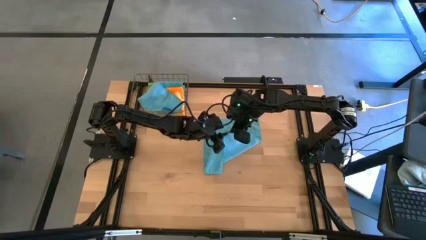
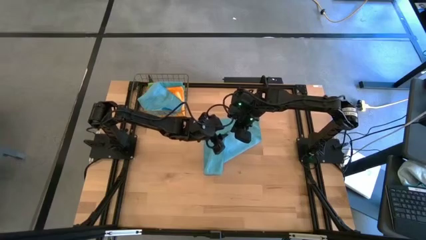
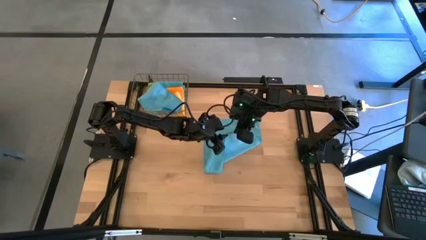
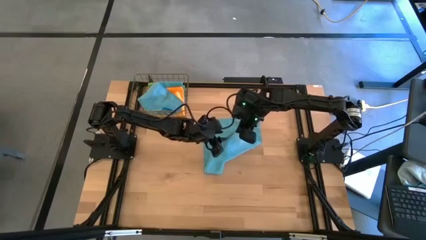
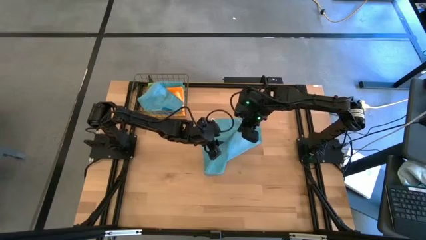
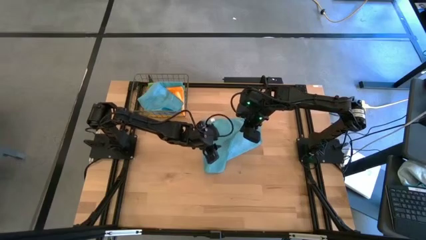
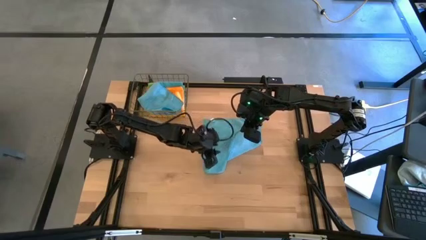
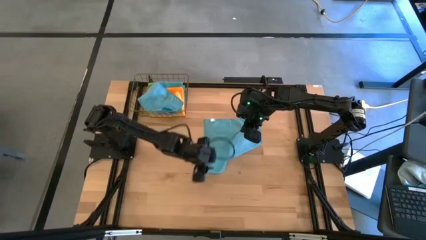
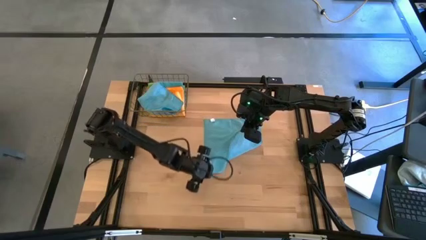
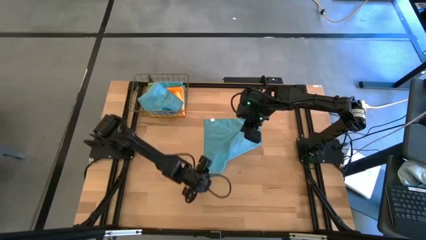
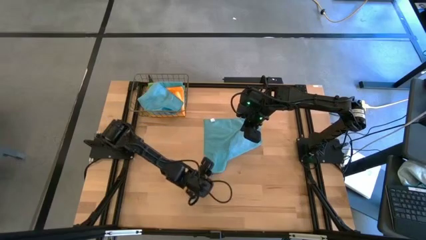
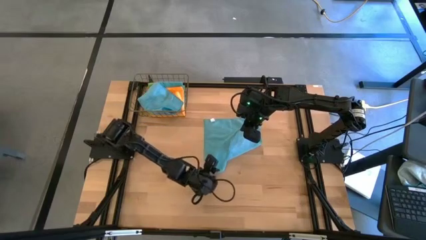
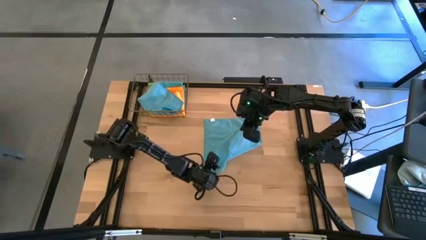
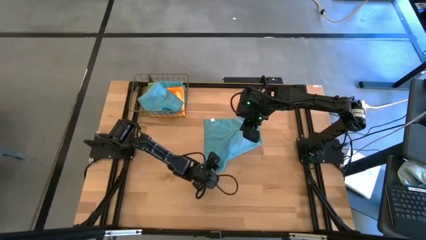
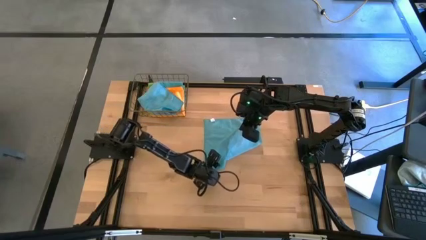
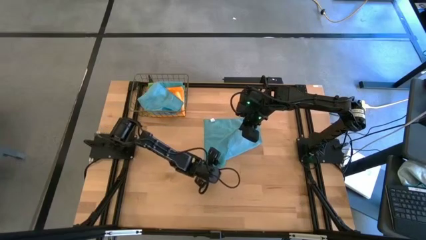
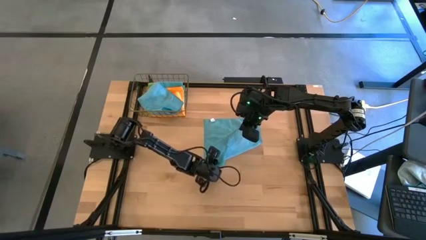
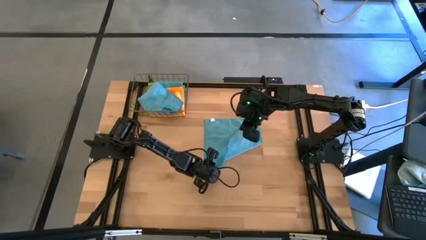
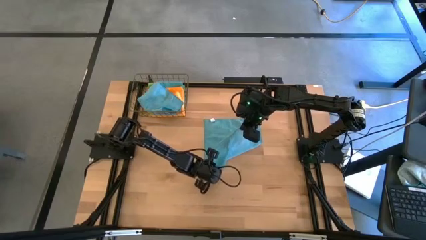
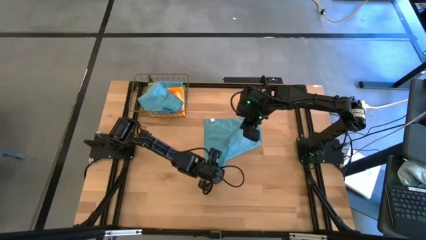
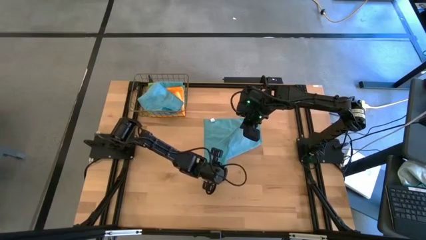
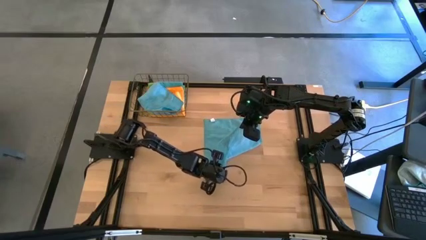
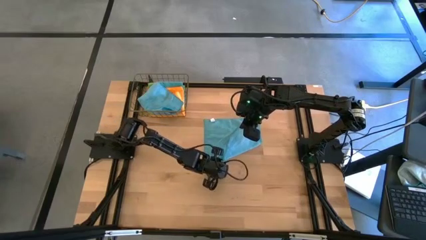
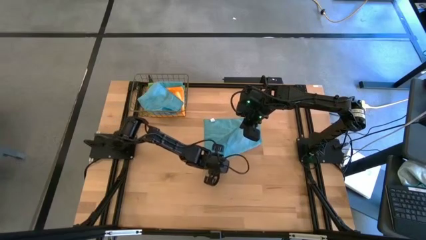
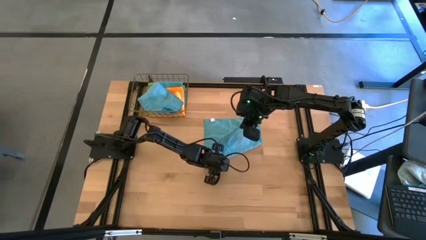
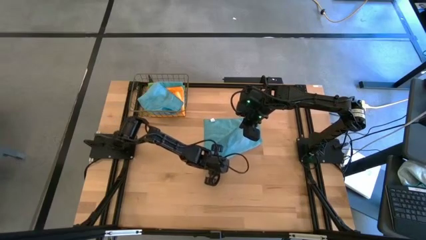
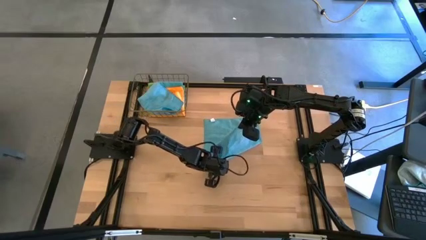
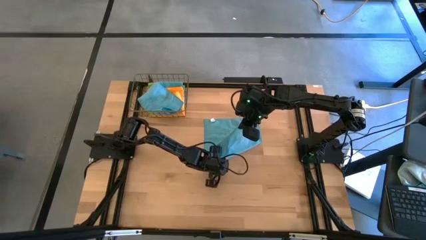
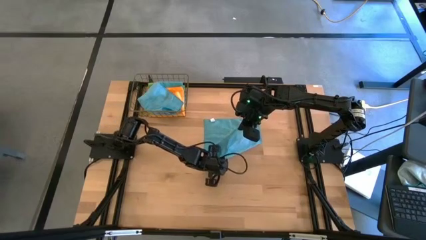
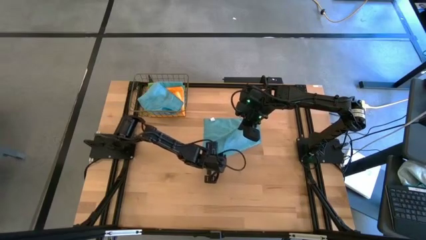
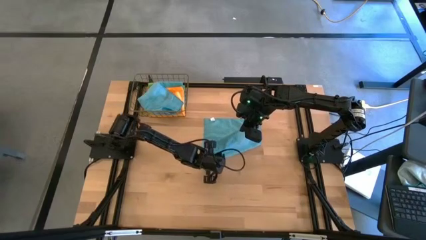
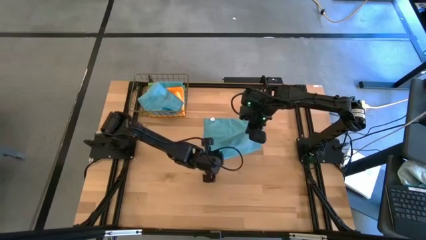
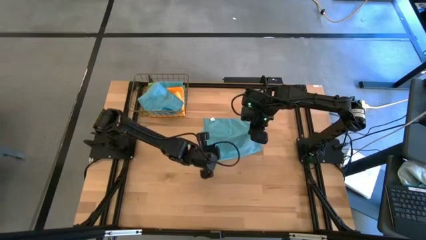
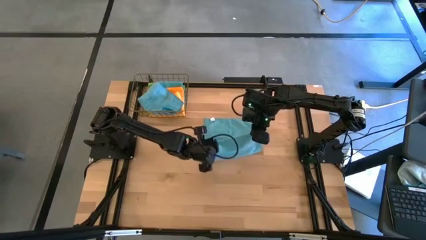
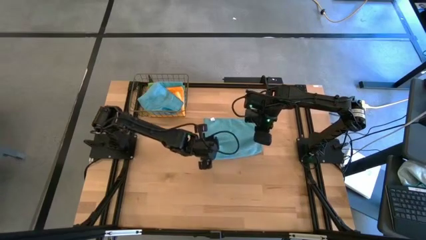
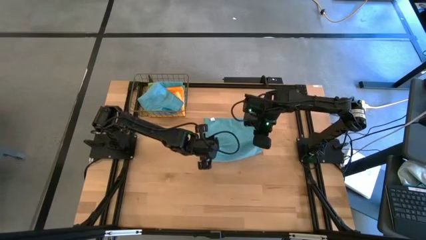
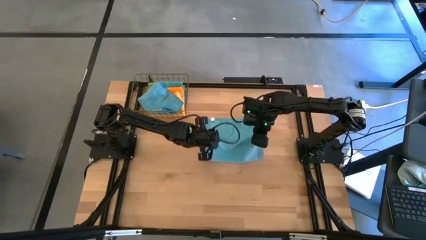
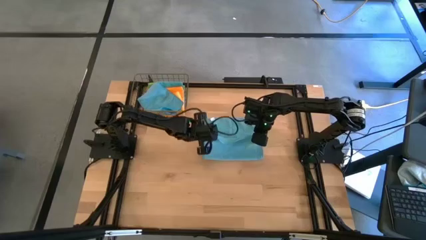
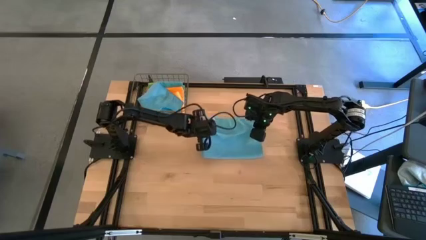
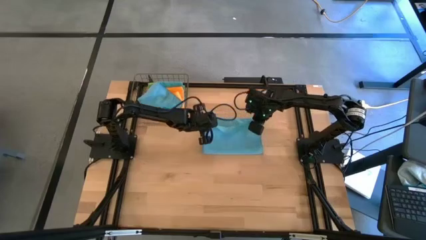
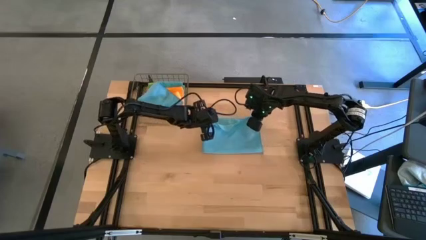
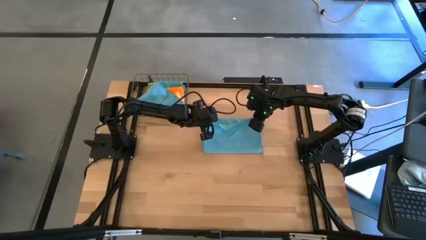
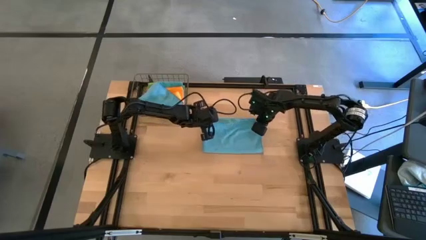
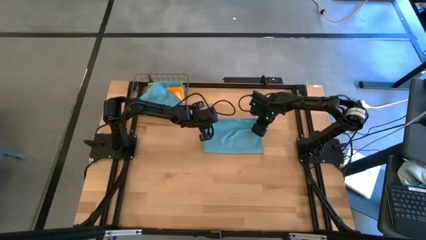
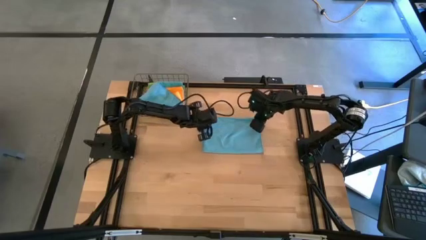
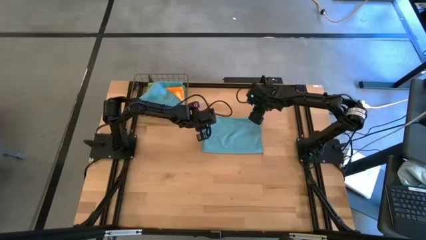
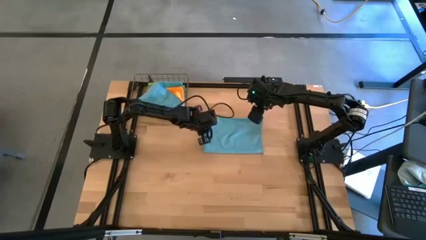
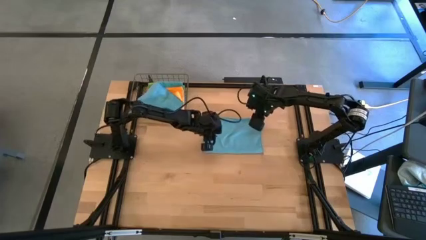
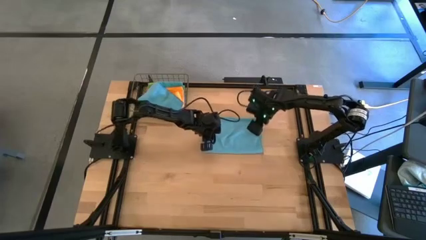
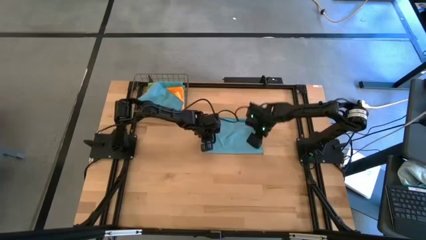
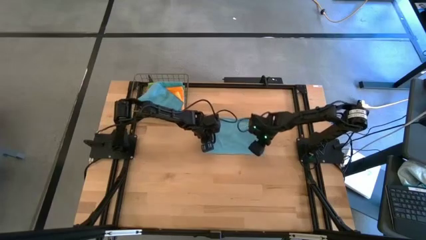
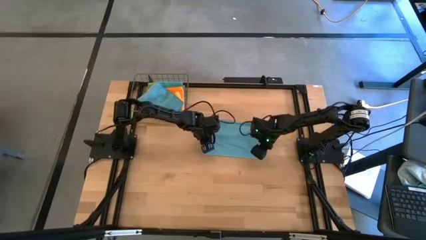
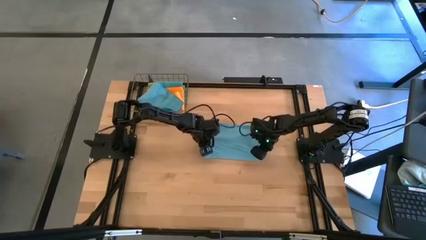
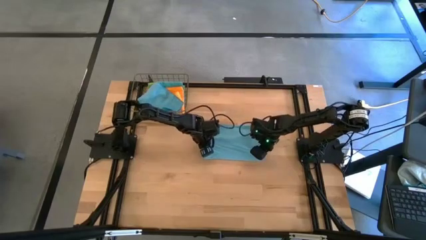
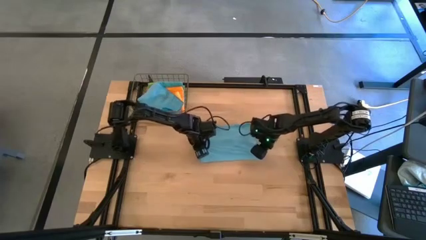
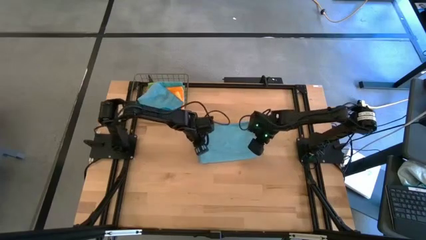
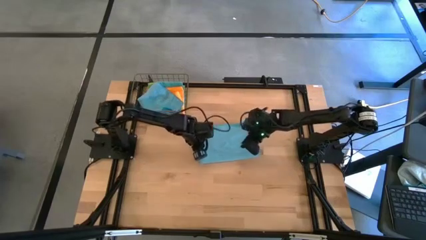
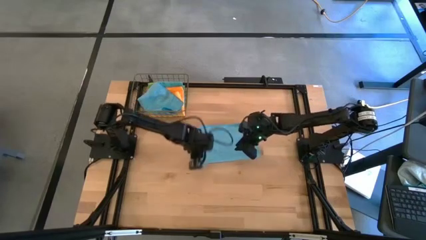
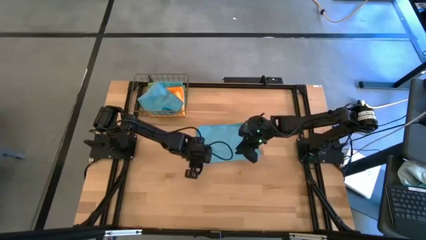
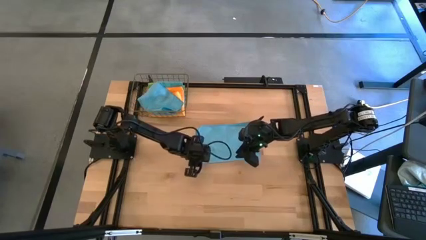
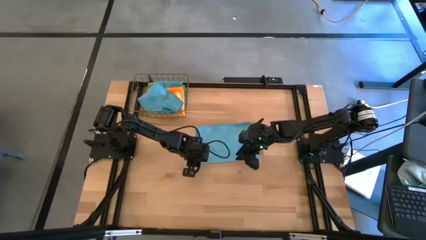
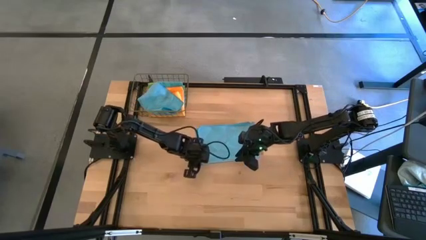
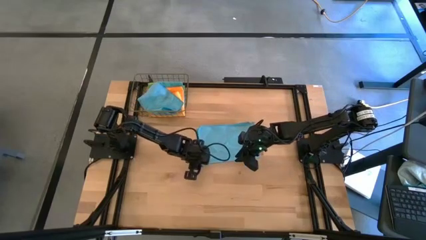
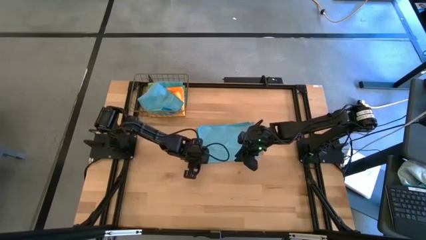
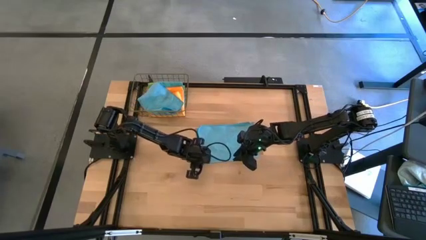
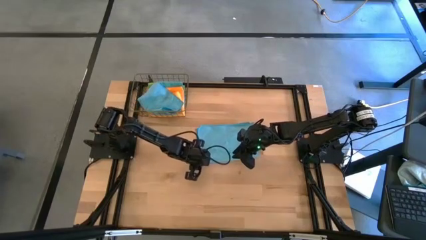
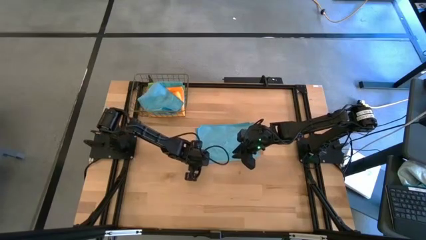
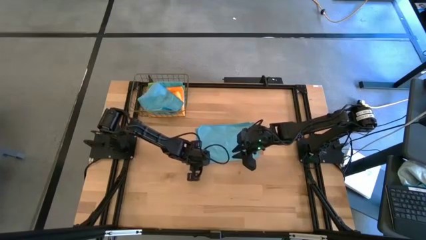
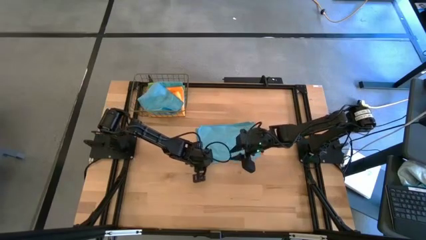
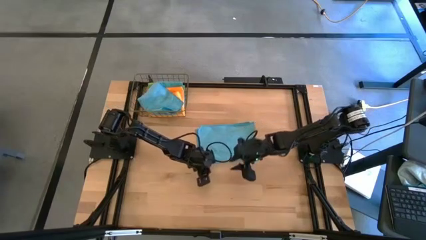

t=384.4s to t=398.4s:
Task: Fold microfiber towels
Fold the light blue microfiber cloth
